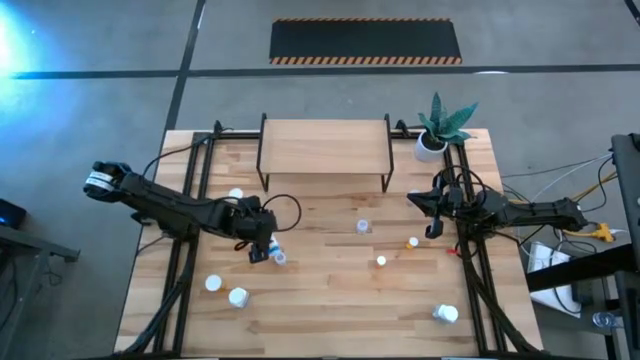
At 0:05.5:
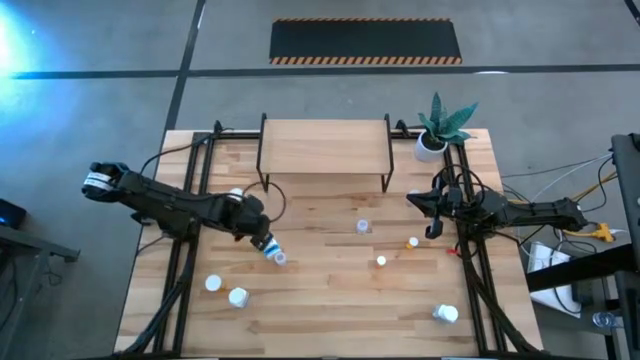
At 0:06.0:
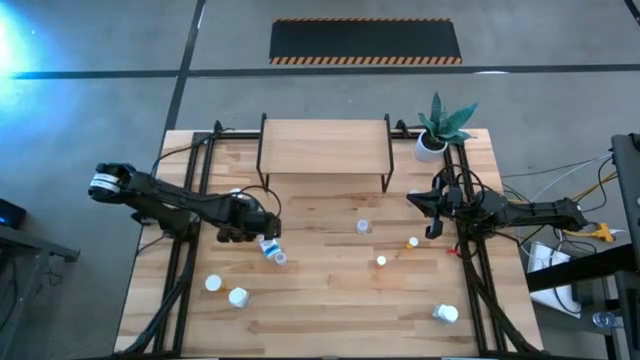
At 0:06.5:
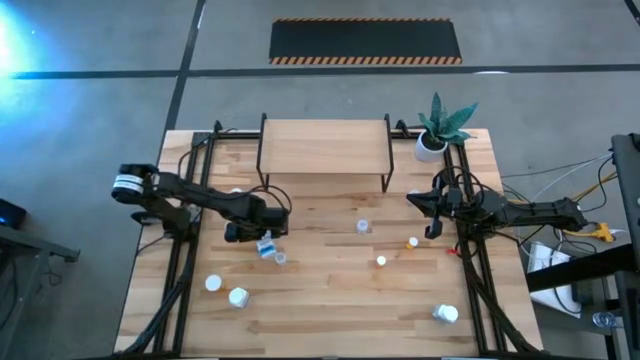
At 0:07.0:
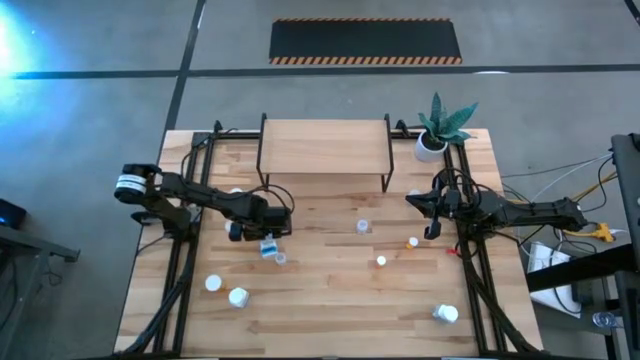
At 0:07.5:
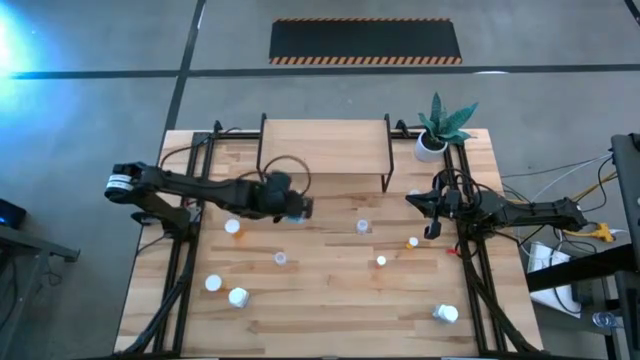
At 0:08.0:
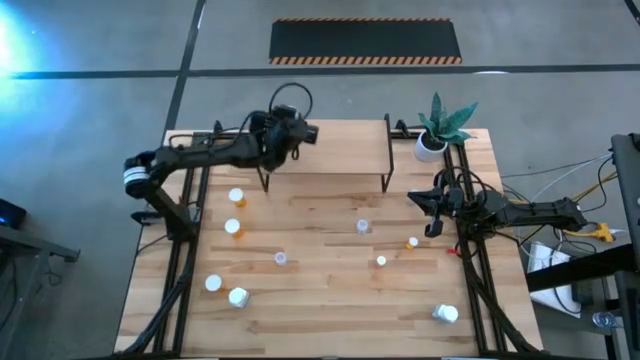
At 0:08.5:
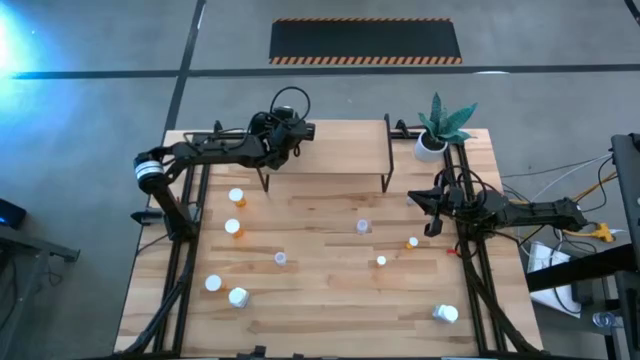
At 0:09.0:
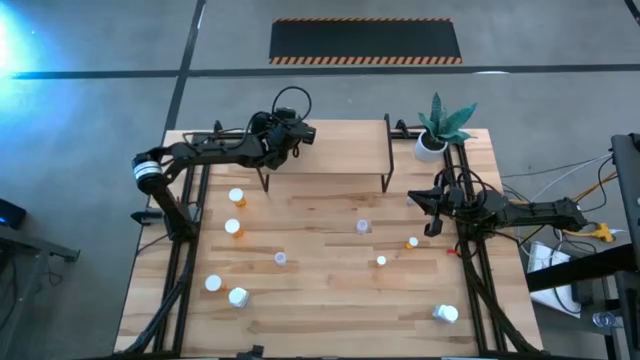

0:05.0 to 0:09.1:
Task: Pick and place medicine bottles onto shelf by color
Put the top left white pill bottle on the shelf

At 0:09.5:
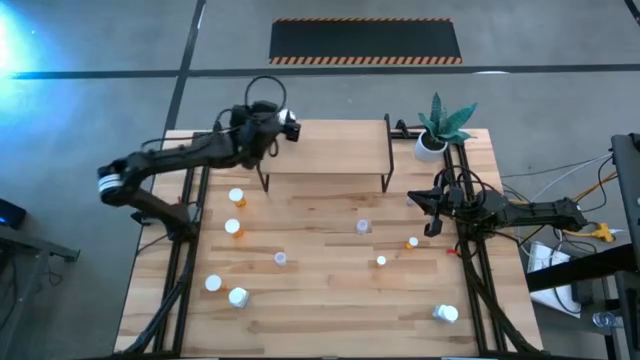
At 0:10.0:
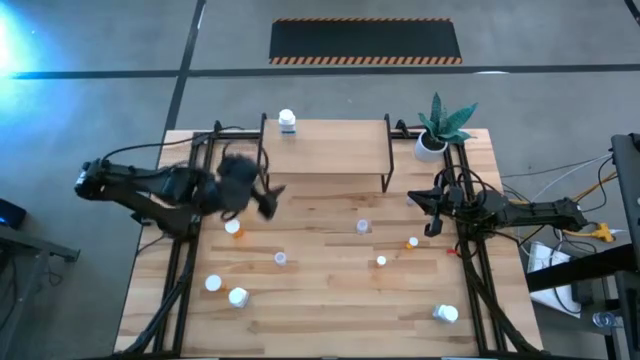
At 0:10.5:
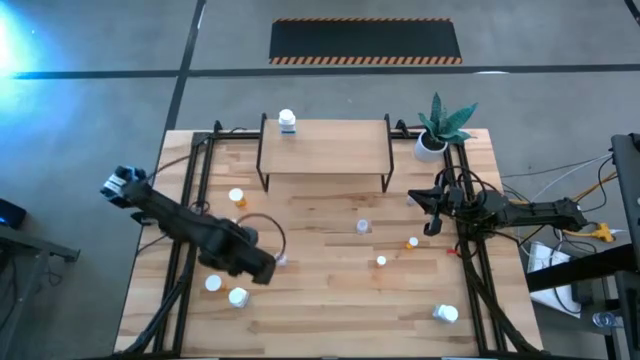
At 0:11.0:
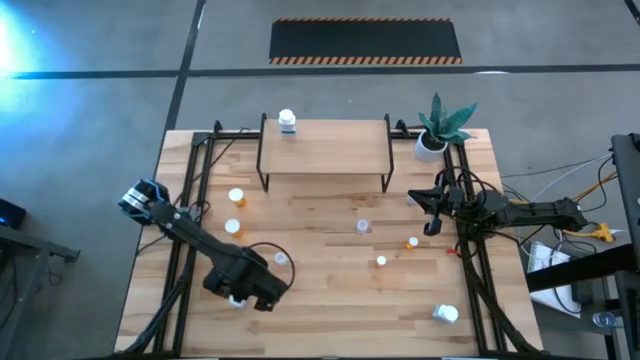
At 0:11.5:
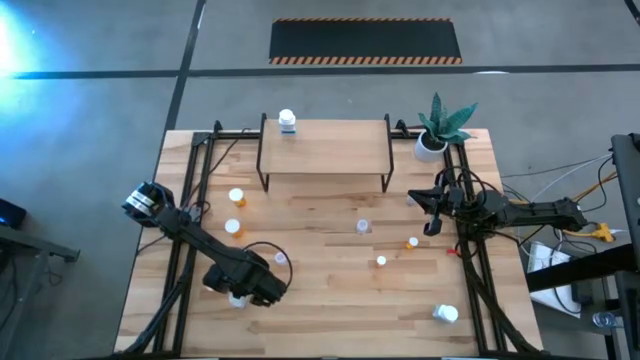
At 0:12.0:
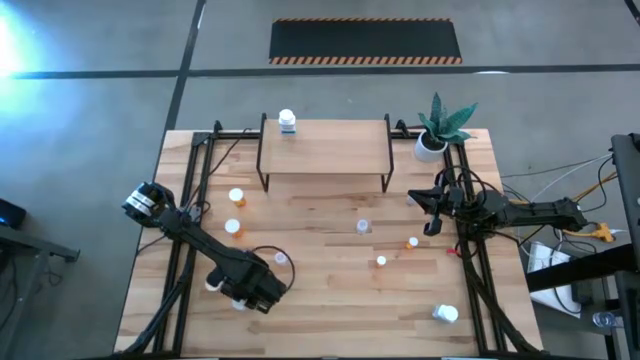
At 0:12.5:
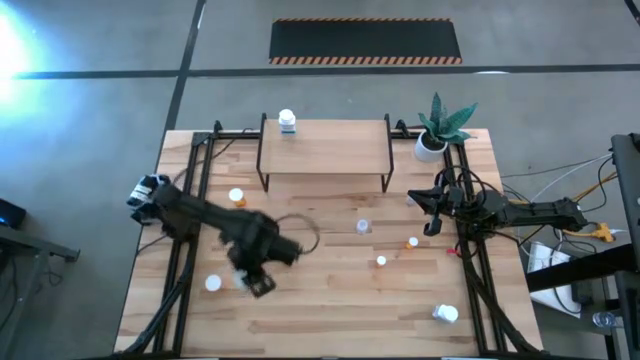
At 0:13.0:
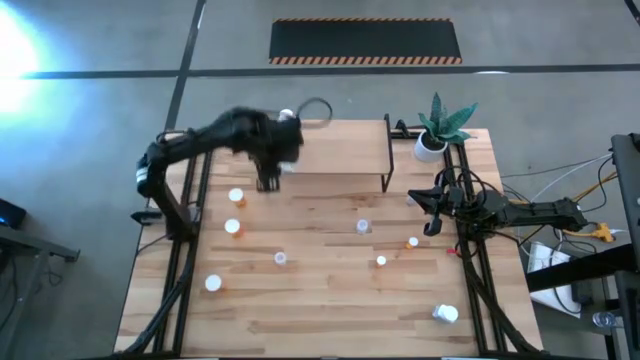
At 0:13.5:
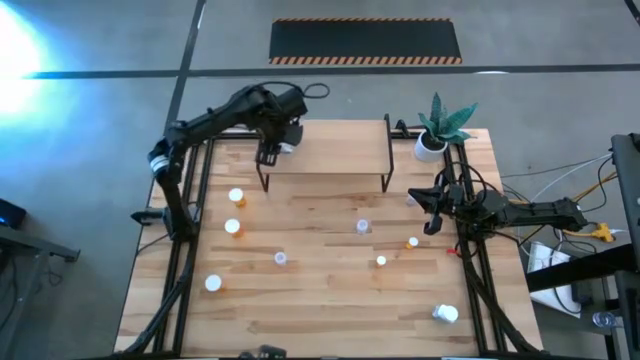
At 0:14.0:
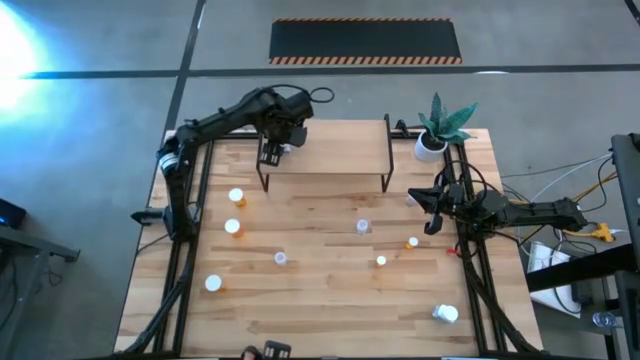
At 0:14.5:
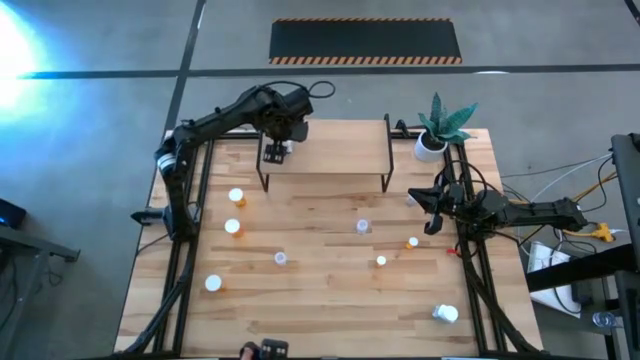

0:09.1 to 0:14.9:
Put the left white pill bottle on the shelf aligned with the other white pill bottle

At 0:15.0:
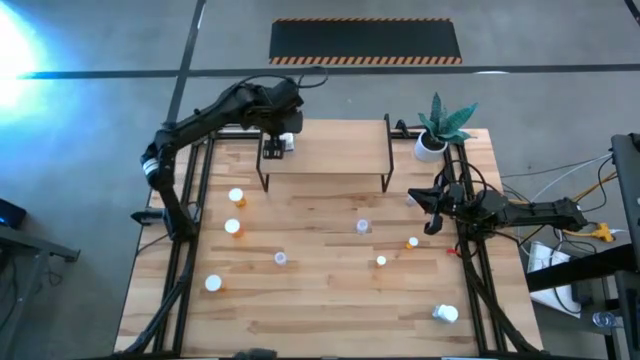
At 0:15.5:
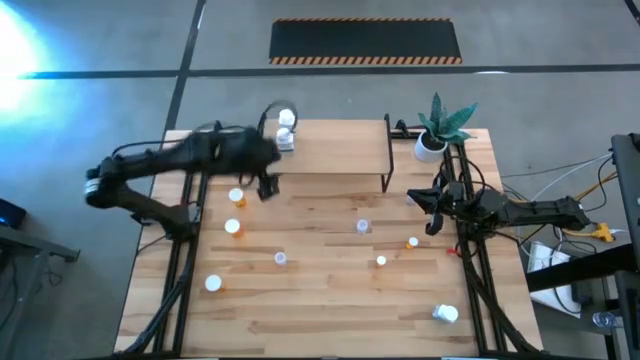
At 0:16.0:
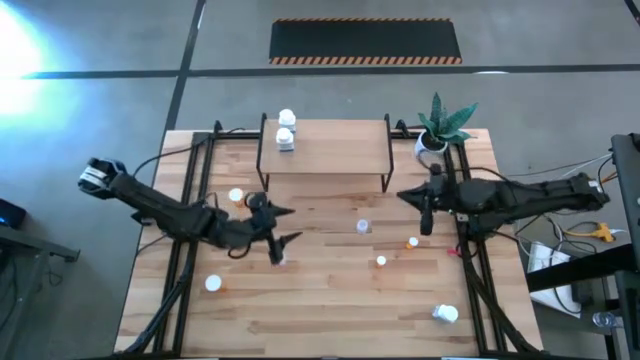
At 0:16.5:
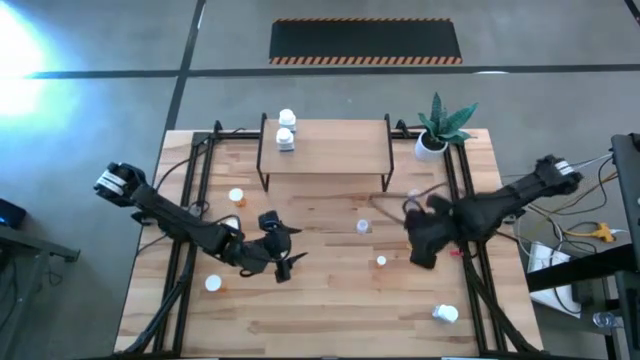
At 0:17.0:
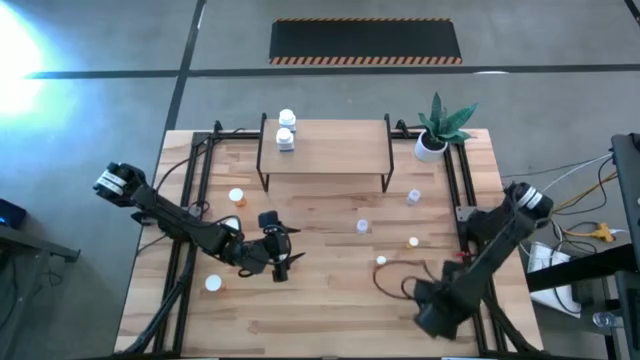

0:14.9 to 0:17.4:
Put the white pill bottle on the shelf aligned with the other white pill bottles

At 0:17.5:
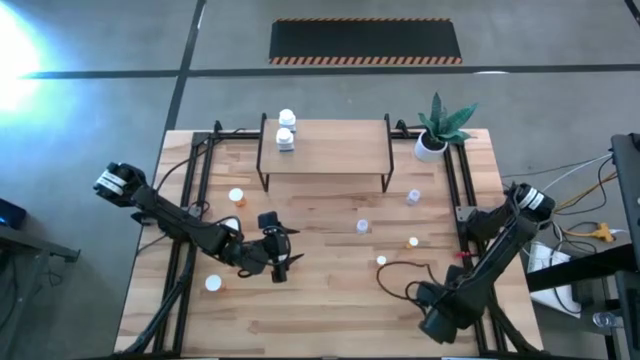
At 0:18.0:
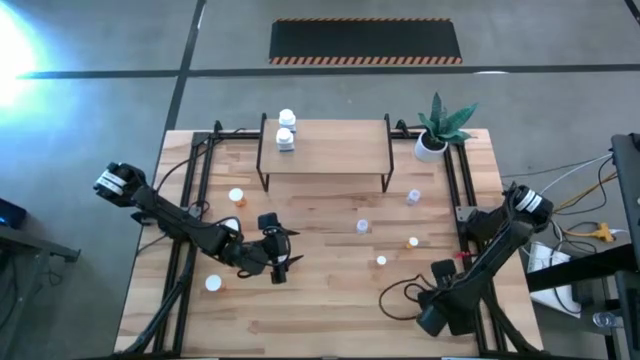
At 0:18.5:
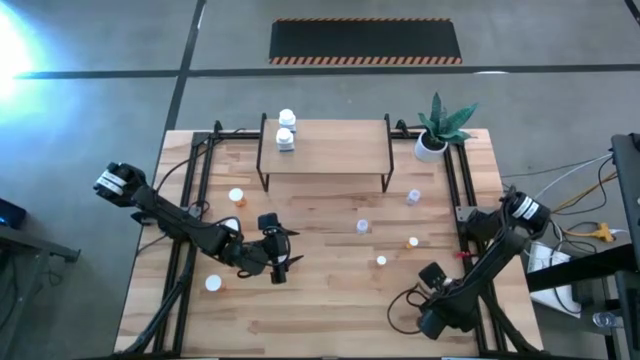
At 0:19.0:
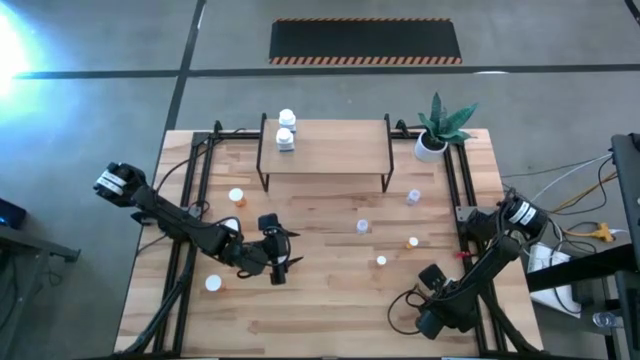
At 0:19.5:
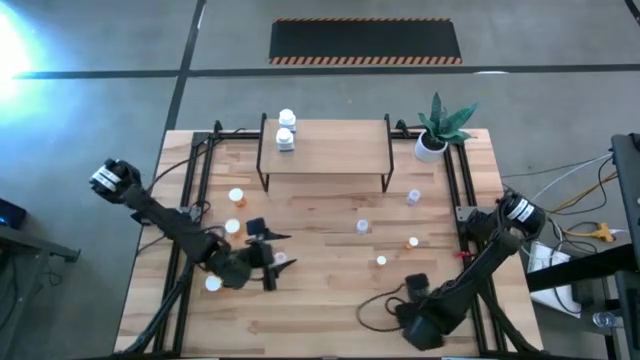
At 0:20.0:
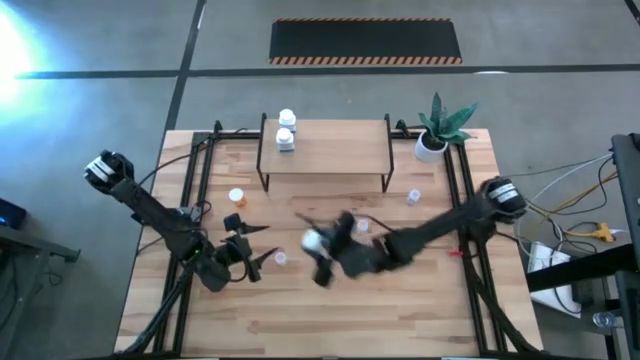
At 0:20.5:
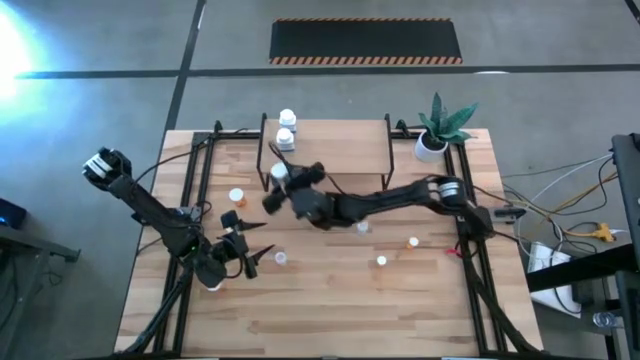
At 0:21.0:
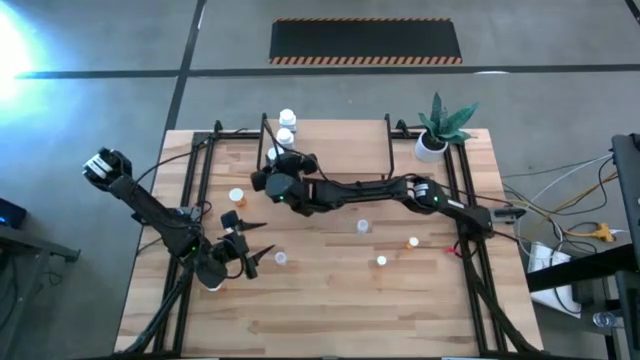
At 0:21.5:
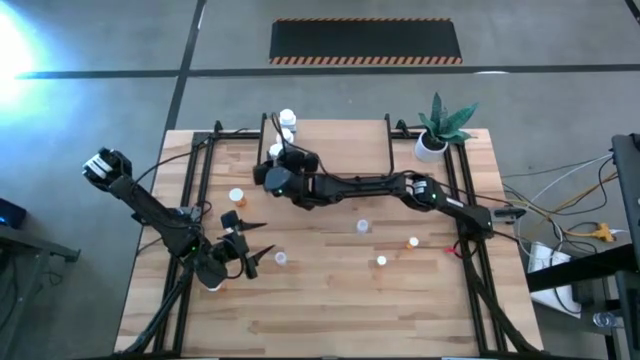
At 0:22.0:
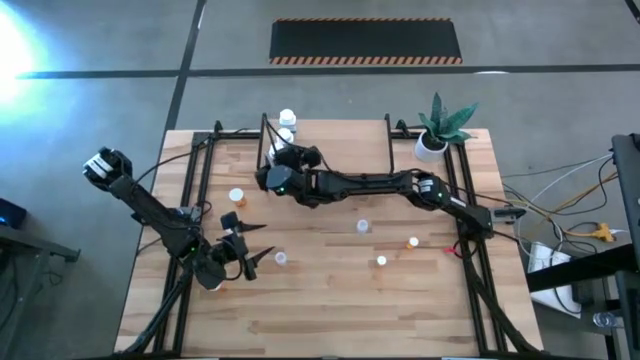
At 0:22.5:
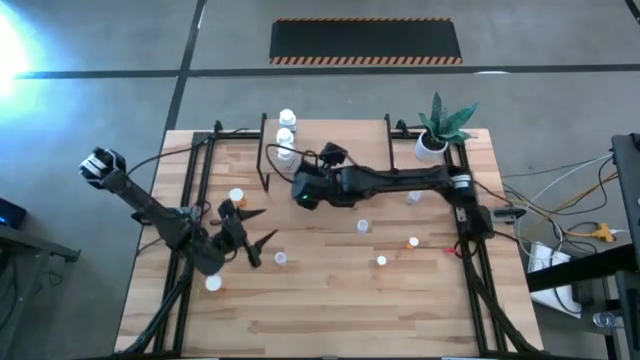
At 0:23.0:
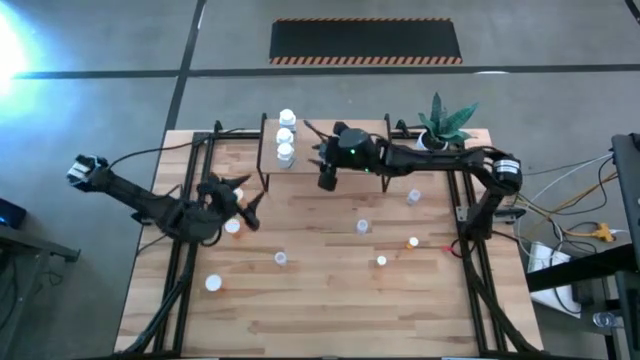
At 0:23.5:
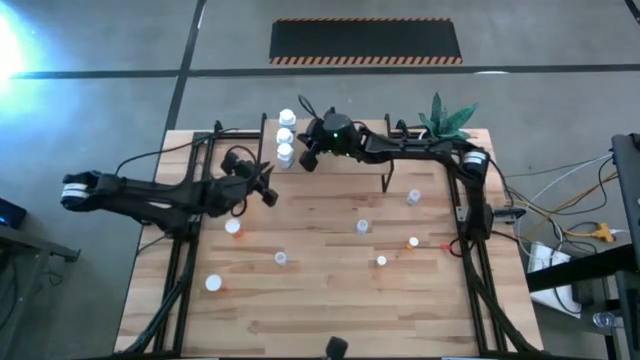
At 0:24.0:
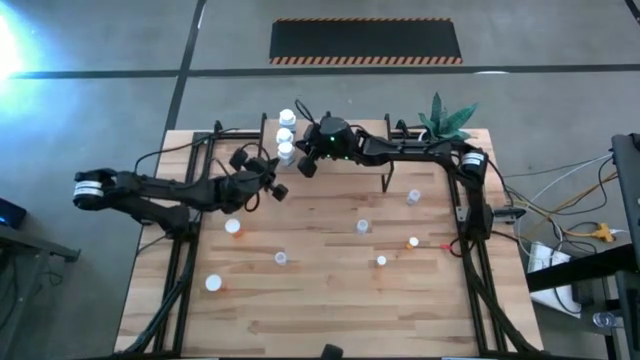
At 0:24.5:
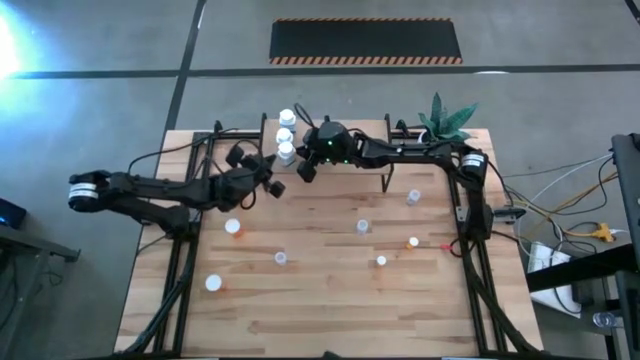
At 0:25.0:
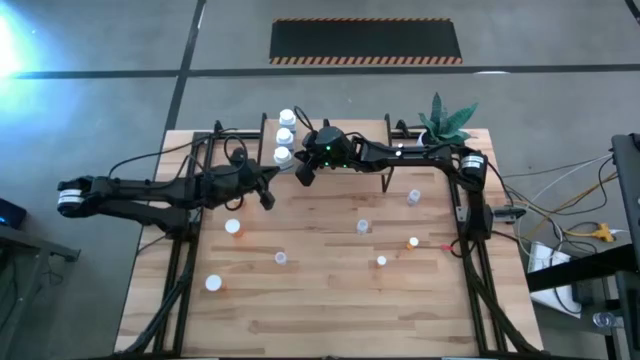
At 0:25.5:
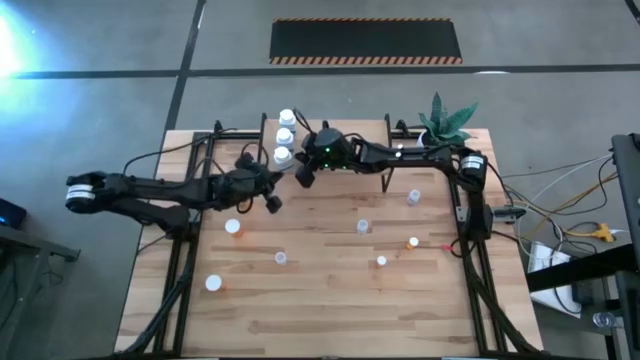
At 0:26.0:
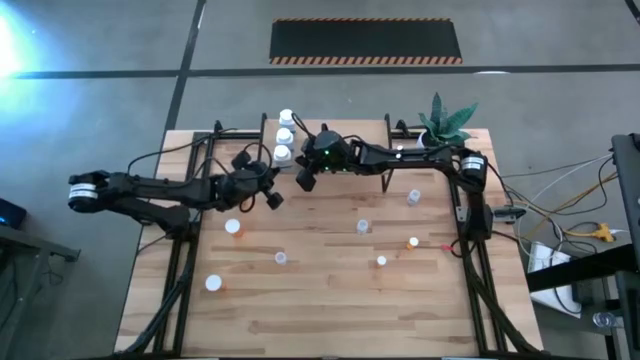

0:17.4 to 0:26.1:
Put the white pill bottle on the shelf aligned with the other white pill bottles
